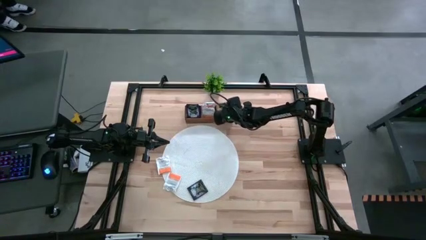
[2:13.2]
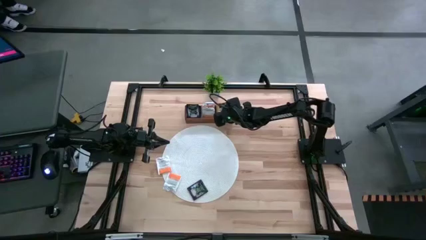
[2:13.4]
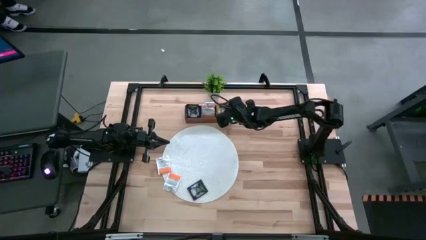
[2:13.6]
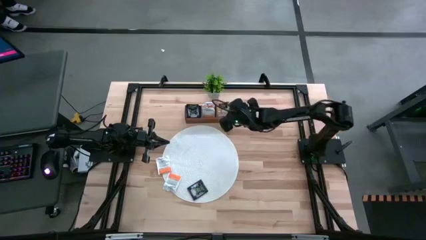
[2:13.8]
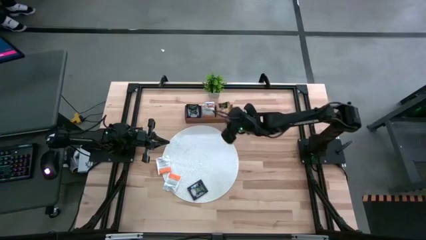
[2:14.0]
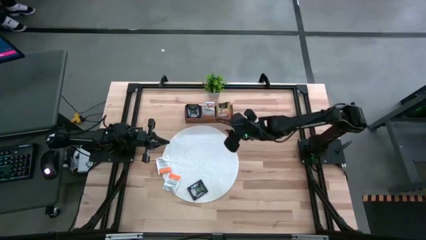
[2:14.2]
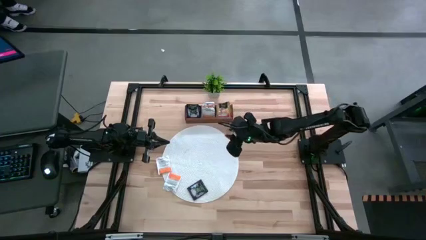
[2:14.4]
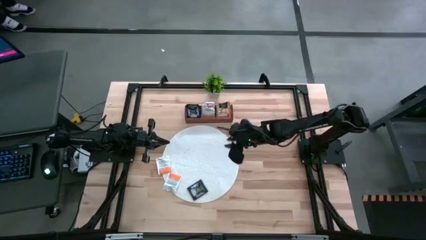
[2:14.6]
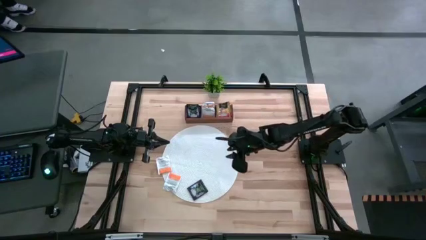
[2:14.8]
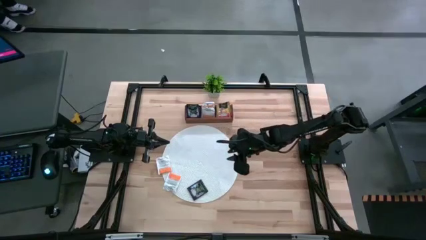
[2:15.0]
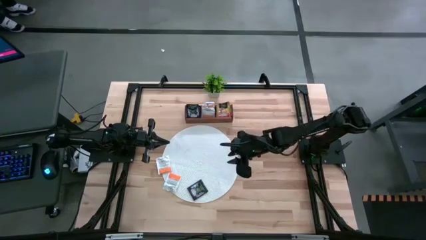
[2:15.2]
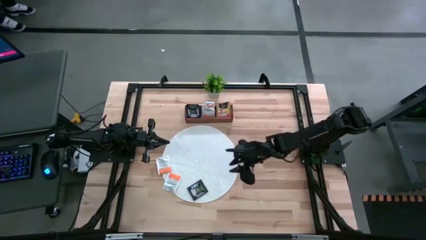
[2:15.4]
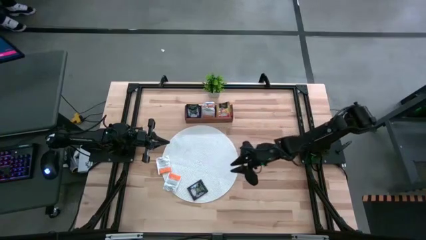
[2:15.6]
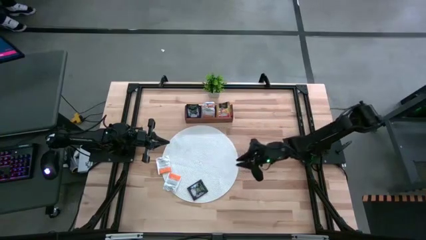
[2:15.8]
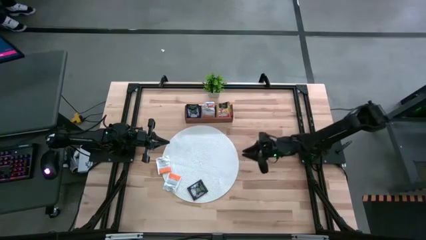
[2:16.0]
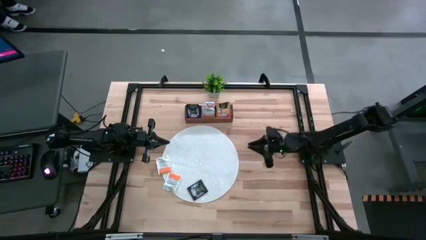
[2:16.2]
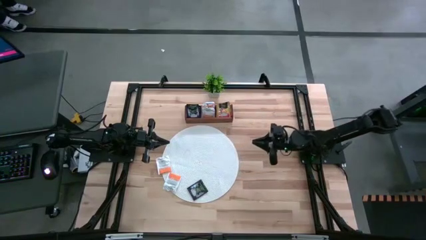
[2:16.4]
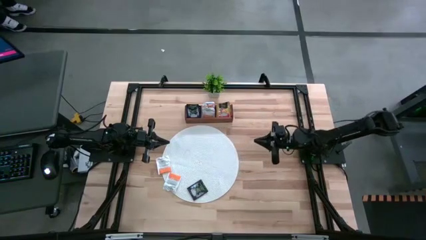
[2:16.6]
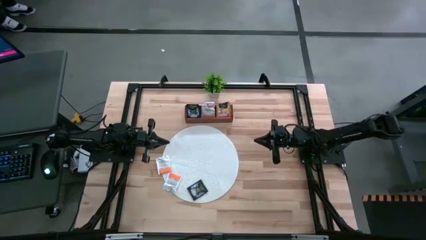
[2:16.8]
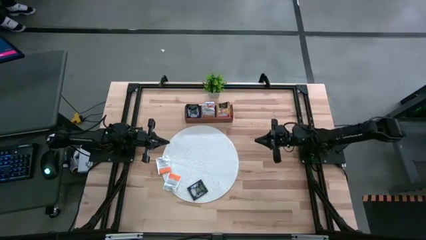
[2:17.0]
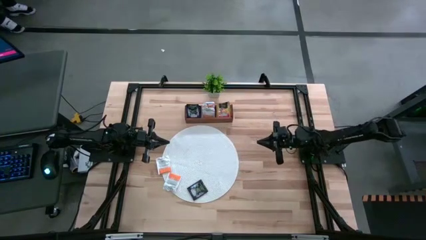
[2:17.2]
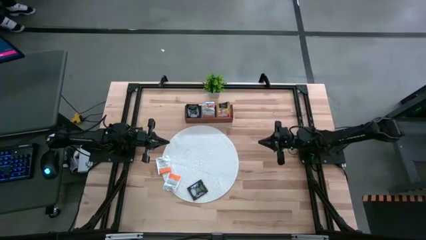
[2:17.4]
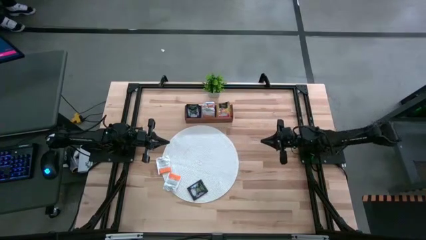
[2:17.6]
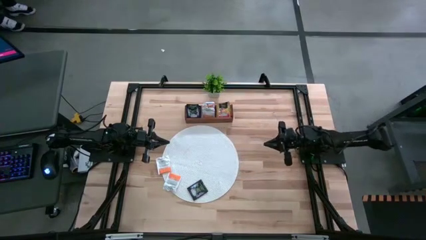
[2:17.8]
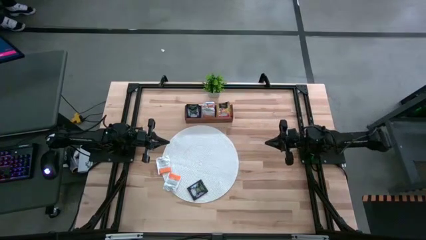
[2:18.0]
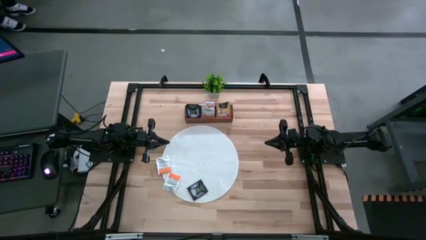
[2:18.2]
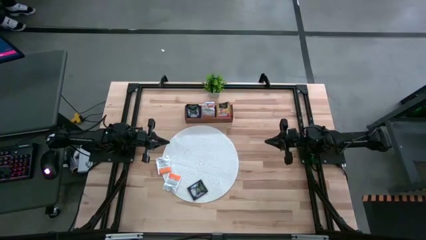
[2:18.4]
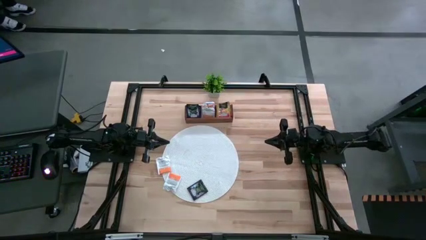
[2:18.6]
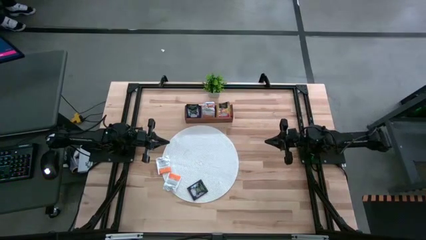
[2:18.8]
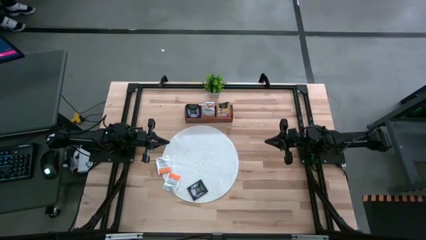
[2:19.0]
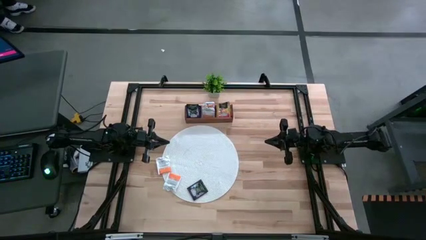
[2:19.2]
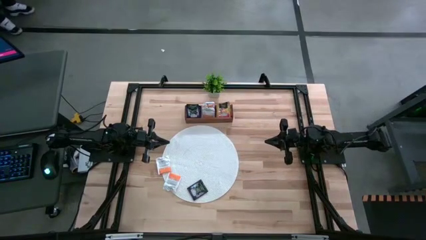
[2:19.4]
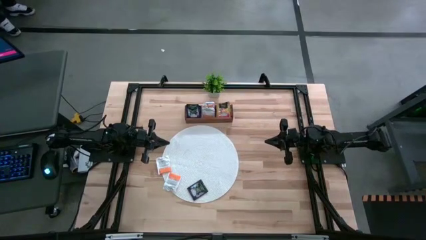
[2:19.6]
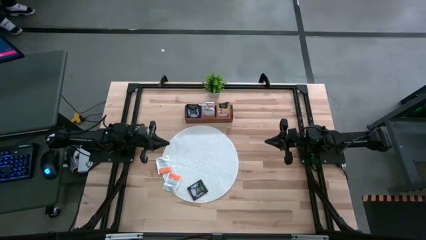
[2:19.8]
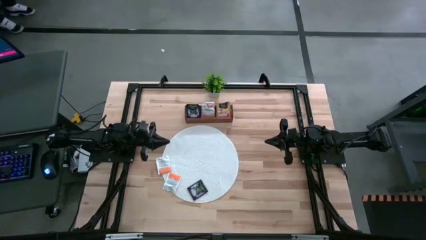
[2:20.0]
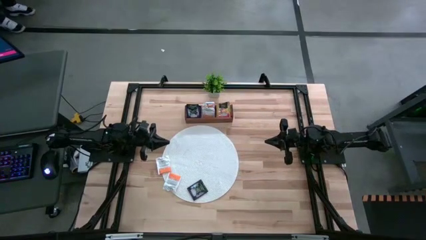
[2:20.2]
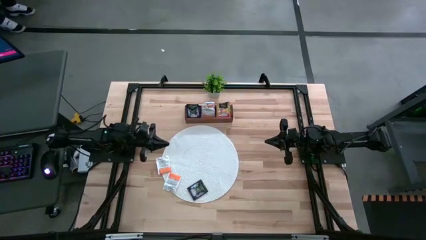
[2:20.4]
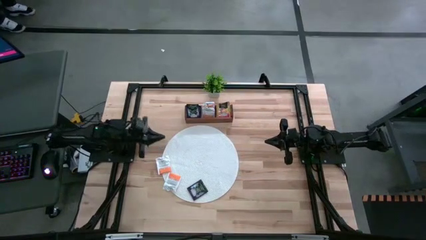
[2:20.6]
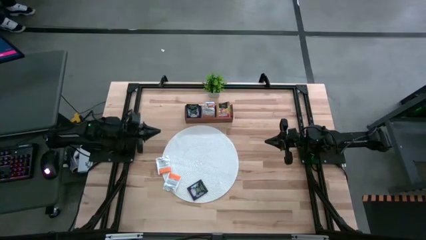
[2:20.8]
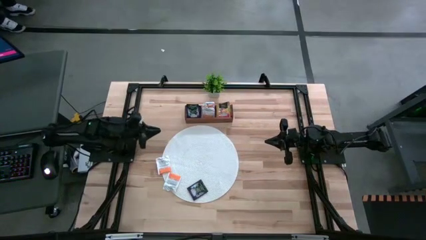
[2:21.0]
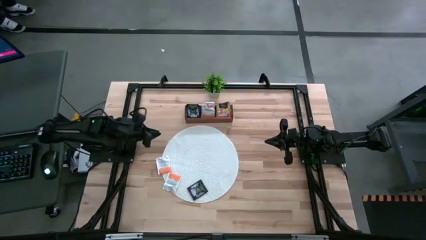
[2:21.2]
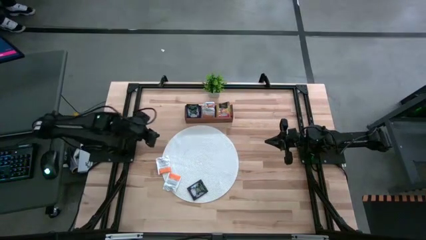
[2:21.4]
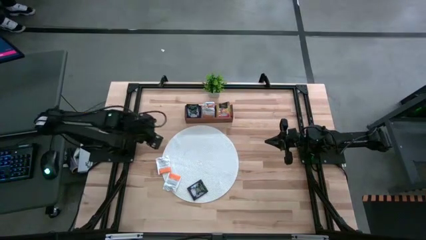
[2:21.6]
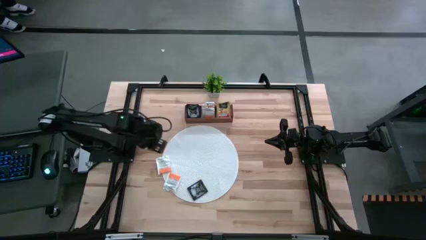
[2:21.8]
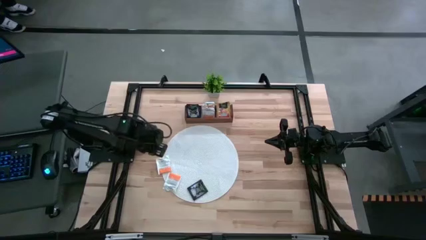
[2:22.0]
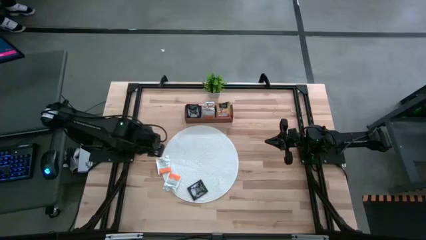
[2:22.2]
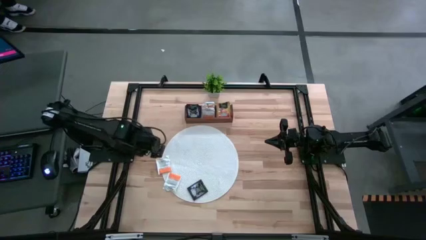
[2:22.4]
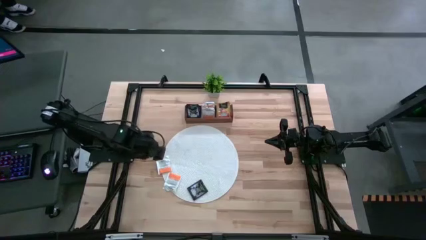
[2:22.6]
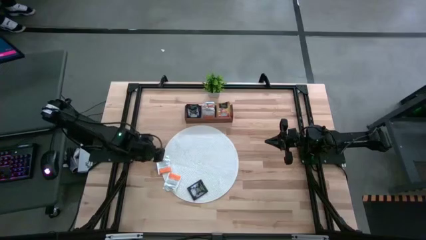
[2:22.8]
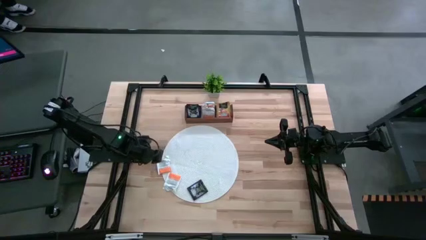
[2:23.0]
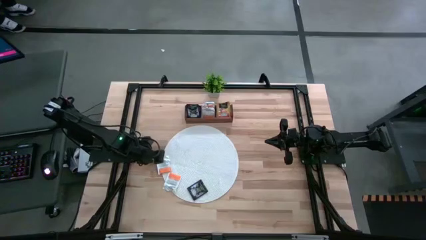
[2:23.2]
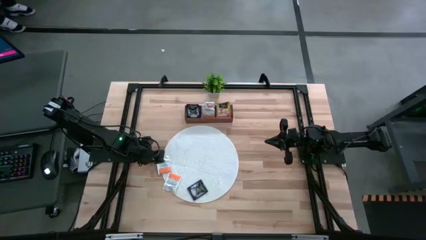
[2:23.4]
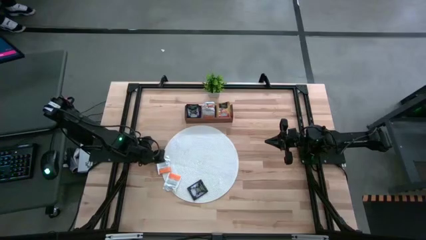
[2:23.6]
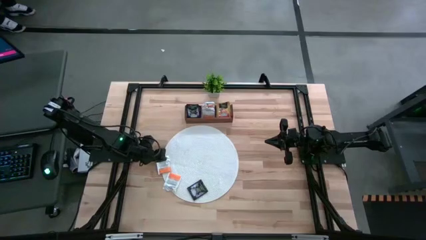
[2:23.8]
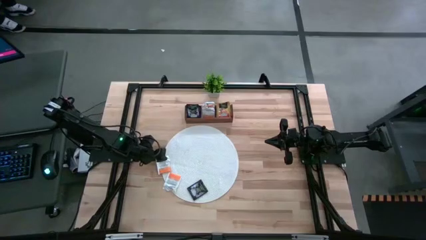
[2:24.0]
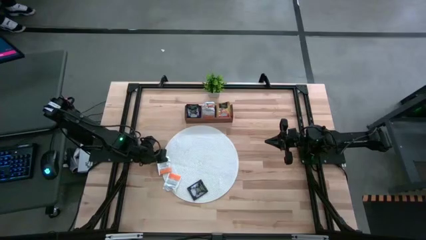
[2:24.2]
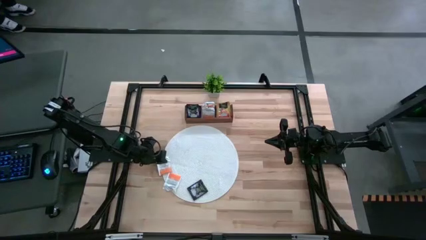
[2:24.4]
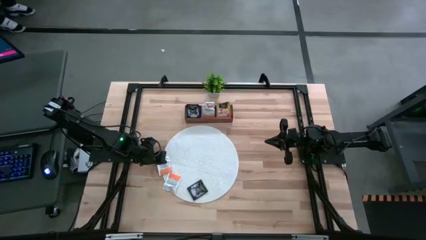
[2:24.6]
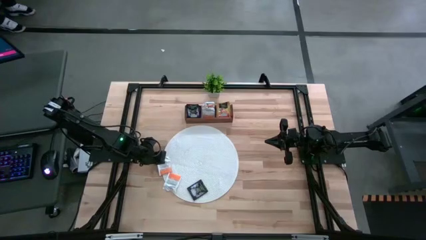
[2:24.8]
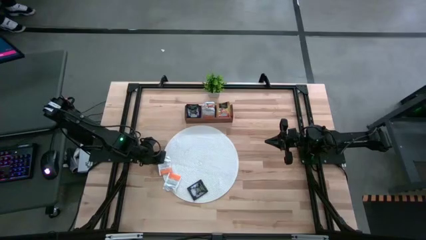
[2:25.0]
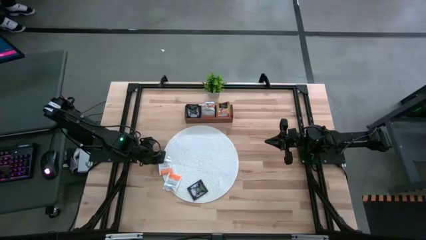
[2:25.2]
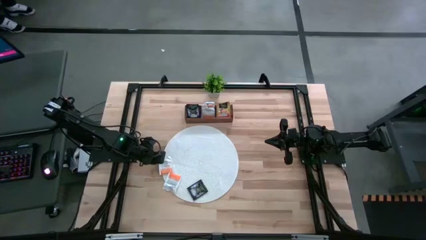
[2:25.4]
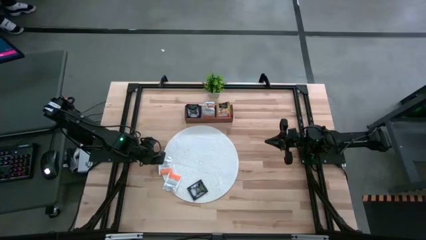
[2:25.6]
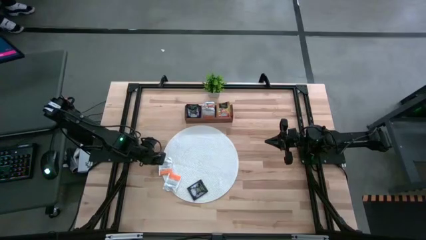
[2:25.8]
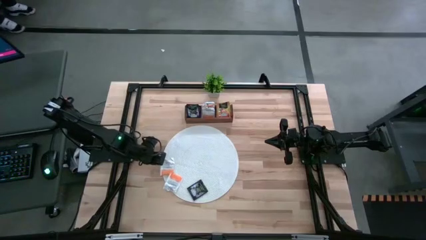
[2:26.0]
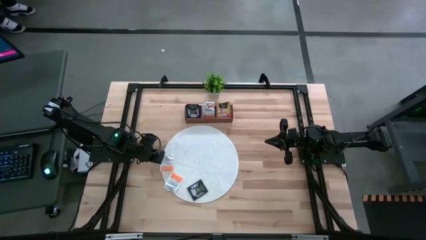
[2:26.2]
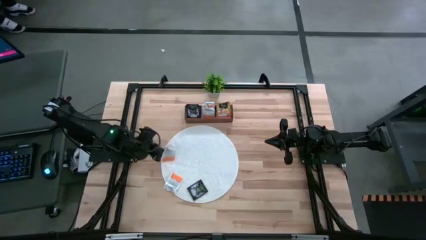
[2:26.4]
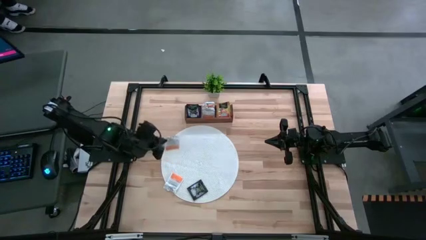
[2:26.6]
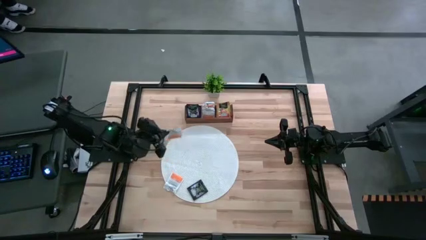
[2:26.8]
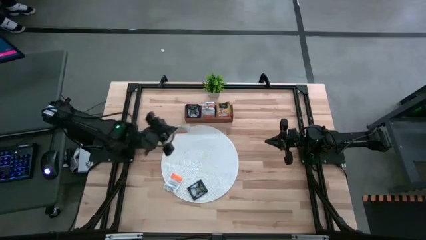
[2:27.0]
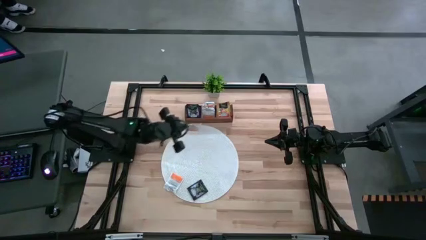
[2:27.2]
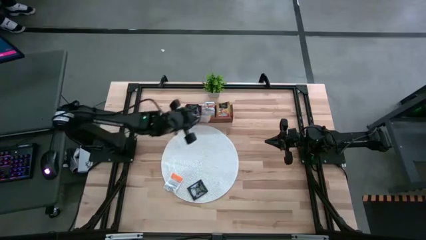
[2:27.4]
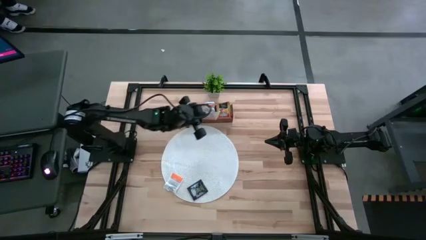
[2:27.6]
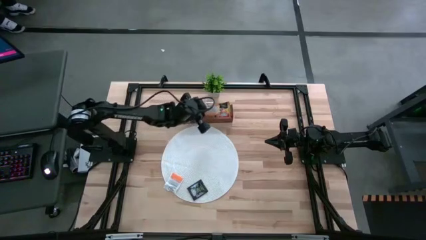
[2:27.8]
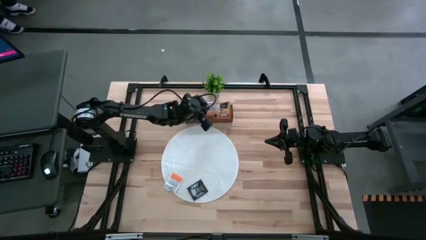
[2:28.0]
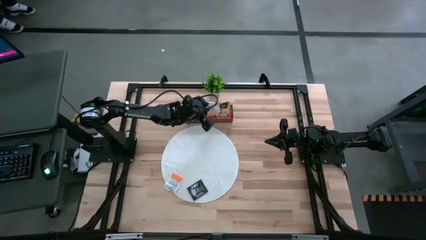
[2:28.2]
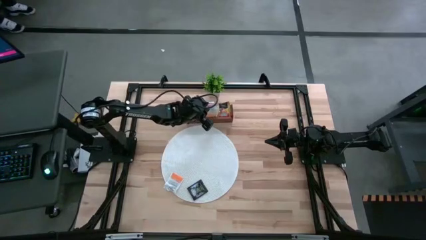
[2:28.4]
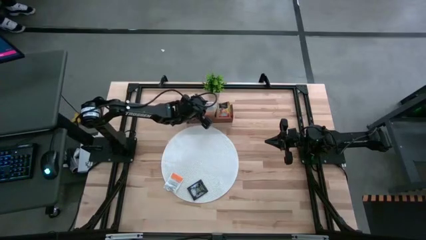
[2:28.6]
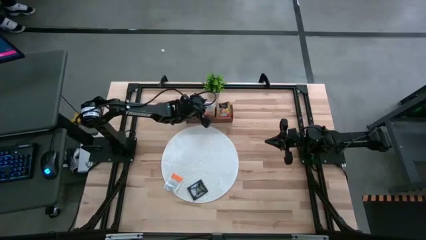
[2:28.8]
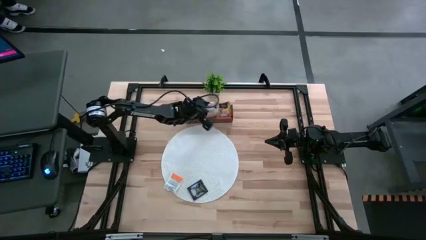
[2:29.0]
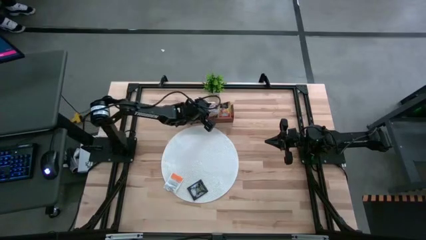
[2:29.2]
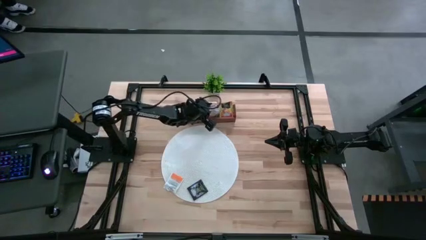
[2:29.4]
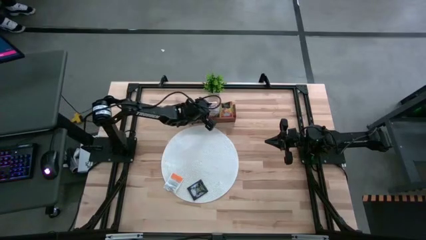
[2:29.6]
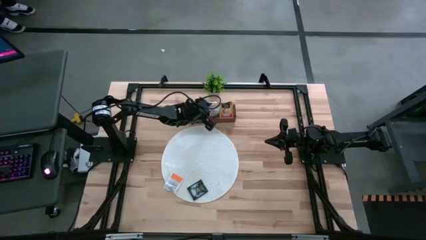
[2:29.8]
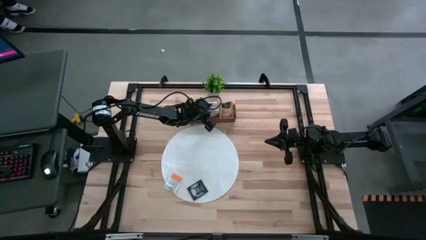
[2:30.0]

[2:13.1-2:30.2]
Task: Pick & Place Tea
Put the orange tea bag into the middle section of the wooden organizer
